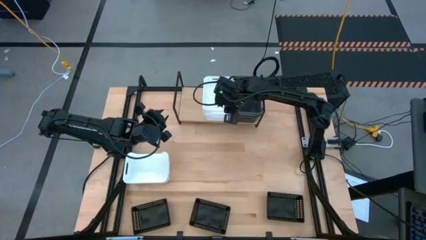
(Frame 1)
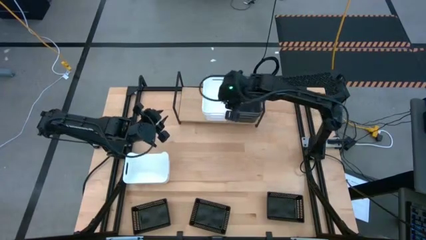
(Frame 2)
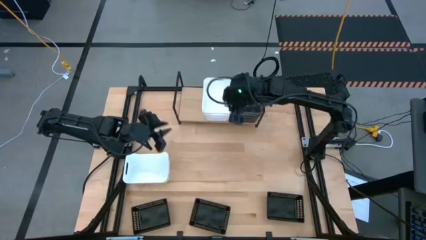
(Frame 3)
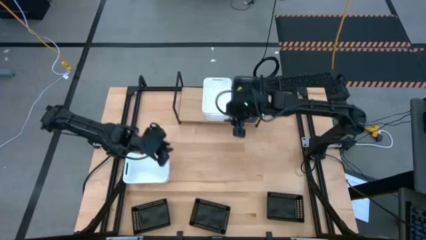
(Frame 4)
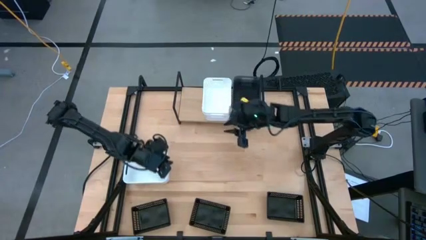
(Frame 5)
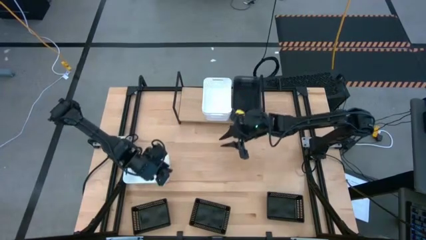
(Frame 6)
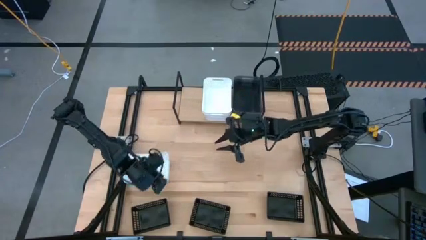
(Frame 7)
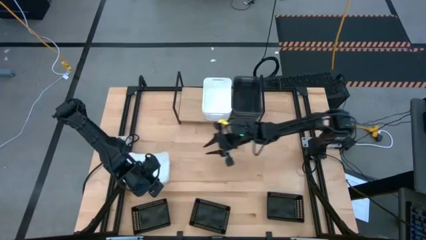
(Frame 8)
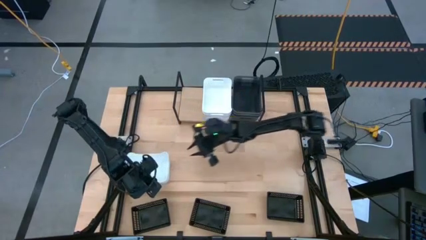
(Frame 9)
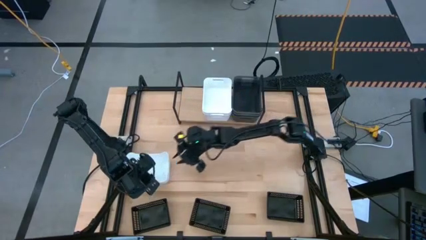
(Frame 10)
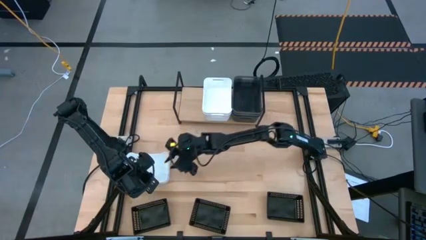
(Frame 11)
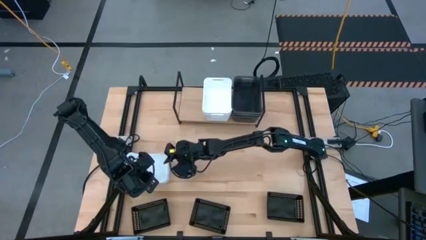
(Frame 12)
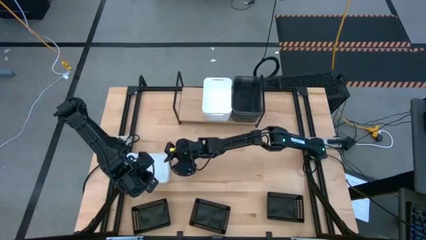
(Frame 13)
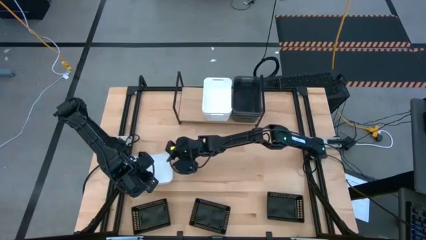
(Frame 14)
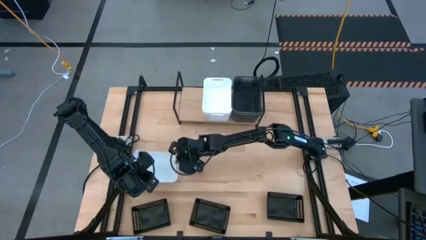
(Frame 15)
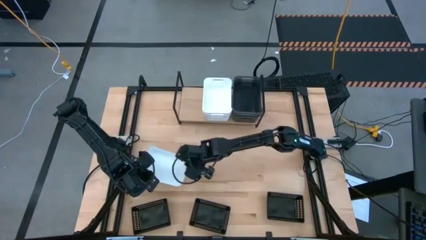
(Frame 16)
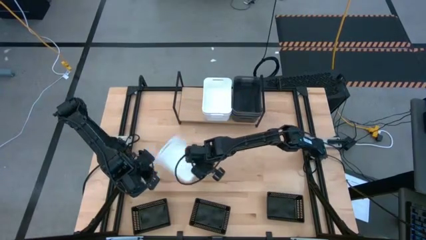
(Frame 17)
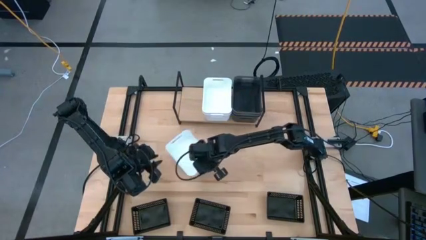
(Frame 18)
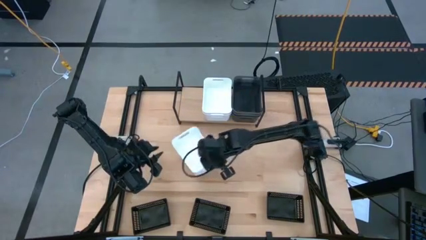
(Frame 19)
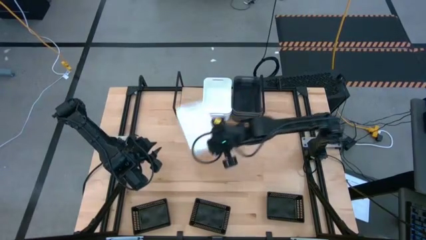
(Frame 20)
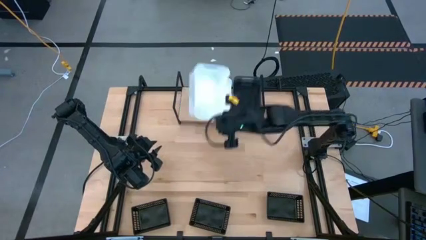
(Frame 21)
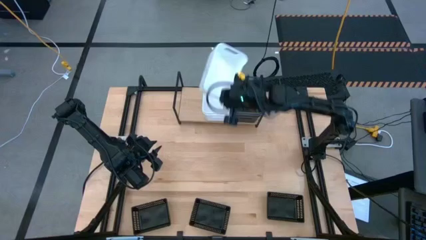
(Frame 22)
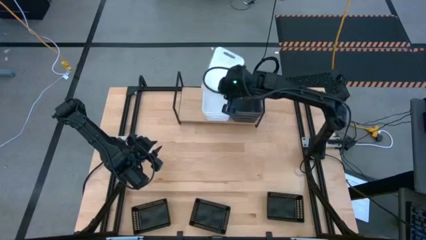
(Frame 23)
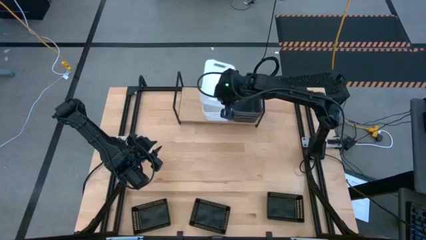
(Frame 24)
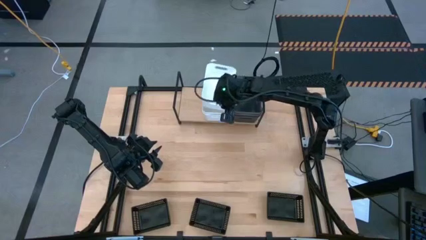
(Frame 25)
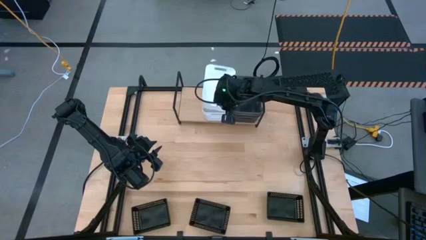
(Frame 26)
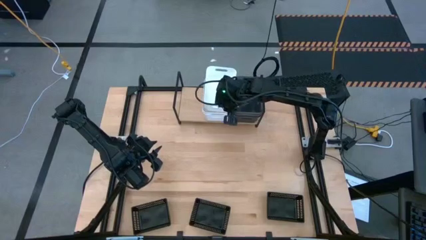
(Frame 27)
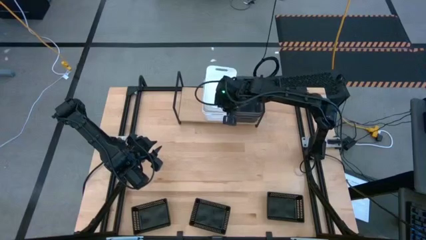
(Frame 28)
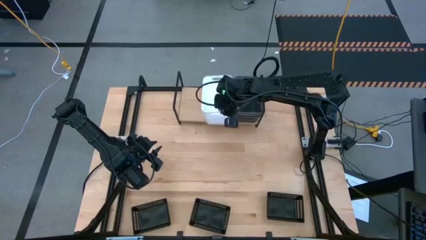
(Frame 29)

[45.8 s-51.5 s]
Task: Stack baskets on shelf by color
Stack the white bin into the white bin on the shelf

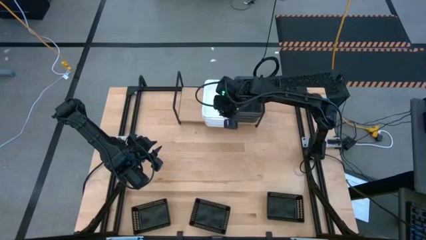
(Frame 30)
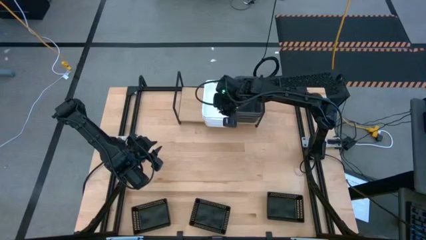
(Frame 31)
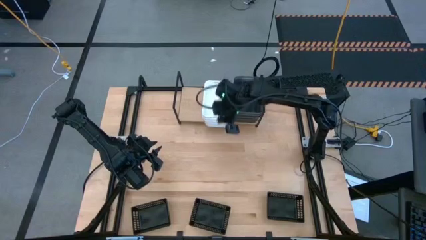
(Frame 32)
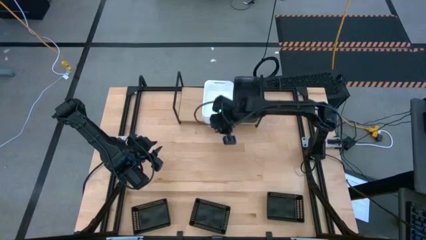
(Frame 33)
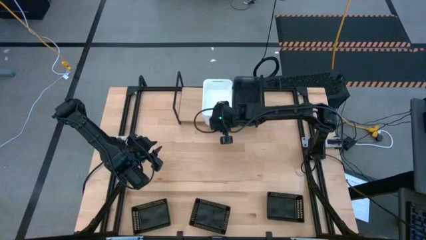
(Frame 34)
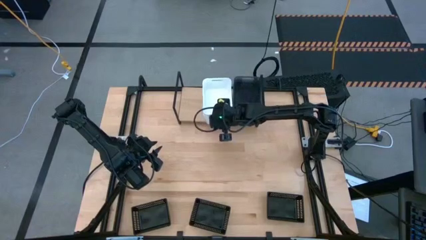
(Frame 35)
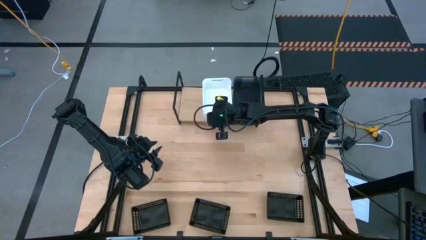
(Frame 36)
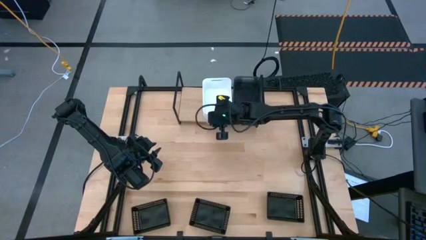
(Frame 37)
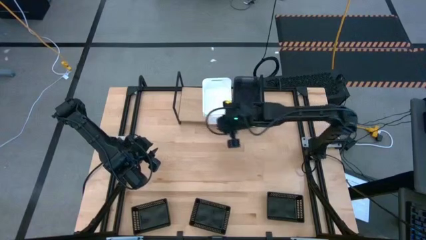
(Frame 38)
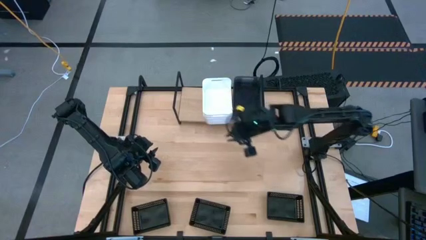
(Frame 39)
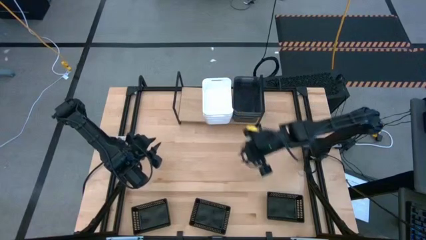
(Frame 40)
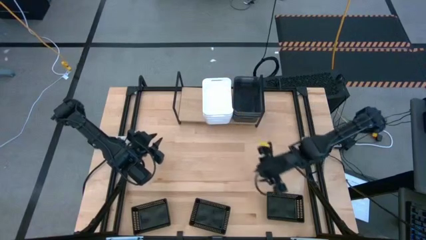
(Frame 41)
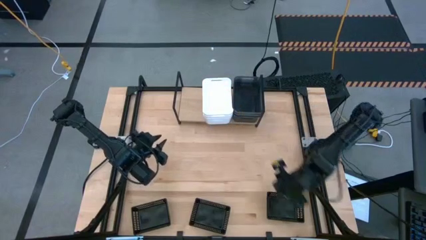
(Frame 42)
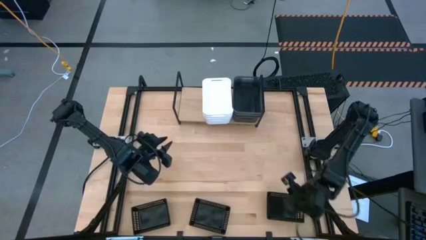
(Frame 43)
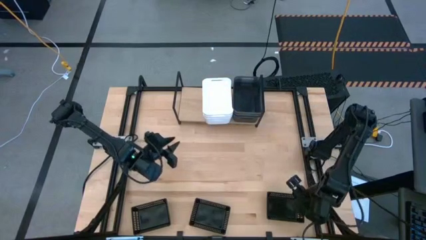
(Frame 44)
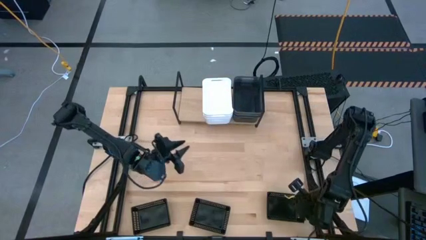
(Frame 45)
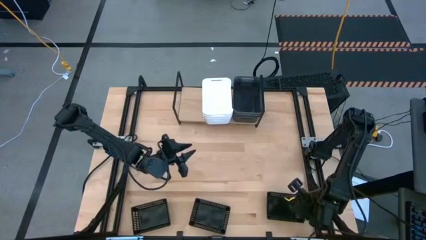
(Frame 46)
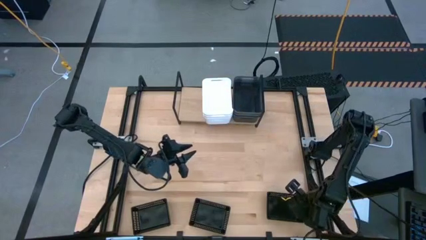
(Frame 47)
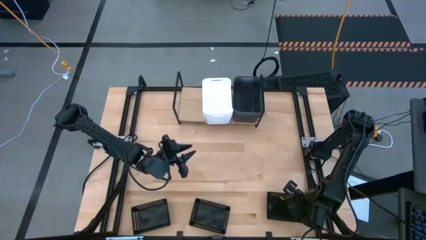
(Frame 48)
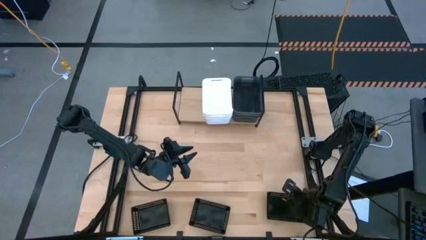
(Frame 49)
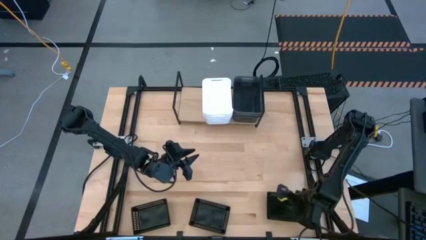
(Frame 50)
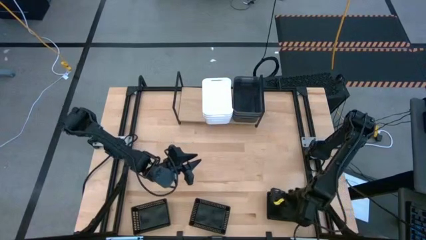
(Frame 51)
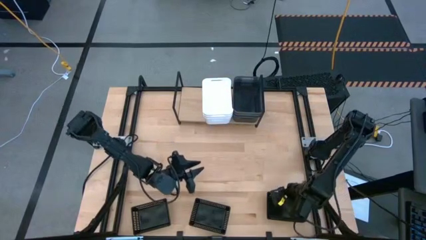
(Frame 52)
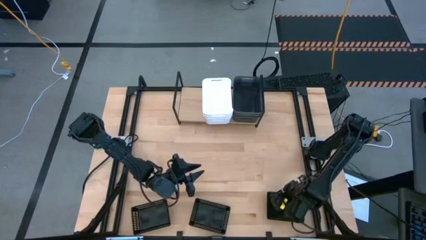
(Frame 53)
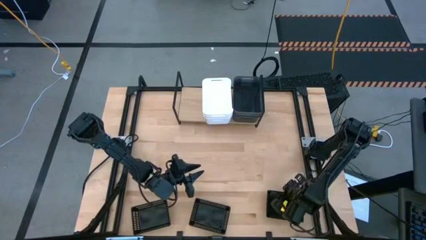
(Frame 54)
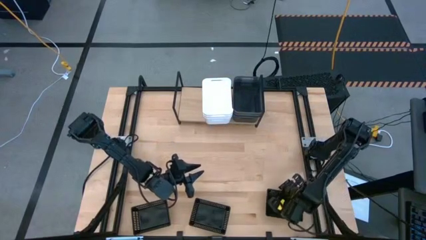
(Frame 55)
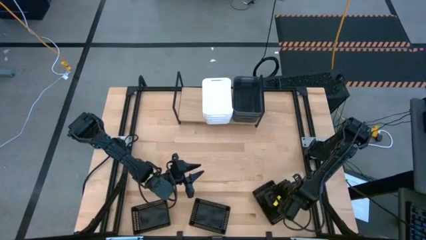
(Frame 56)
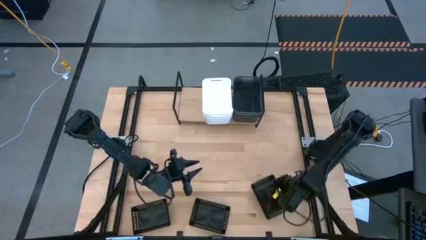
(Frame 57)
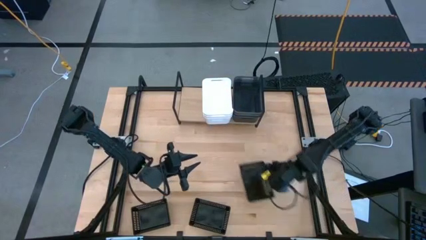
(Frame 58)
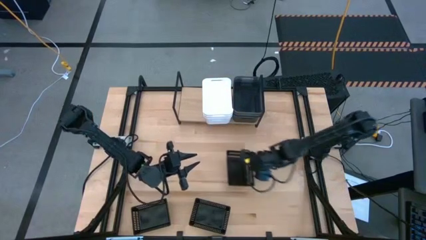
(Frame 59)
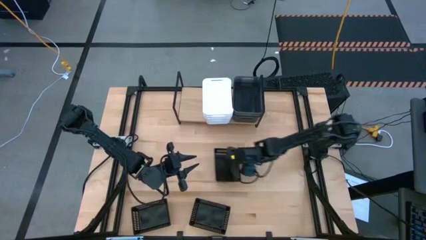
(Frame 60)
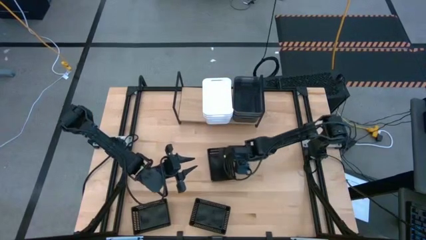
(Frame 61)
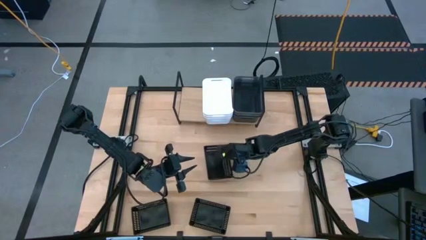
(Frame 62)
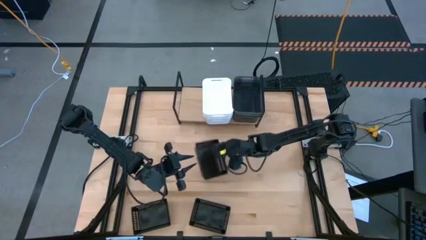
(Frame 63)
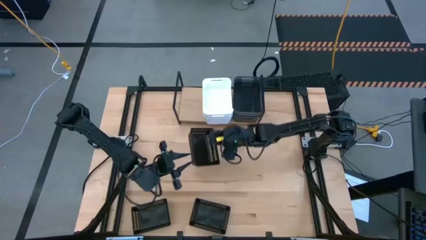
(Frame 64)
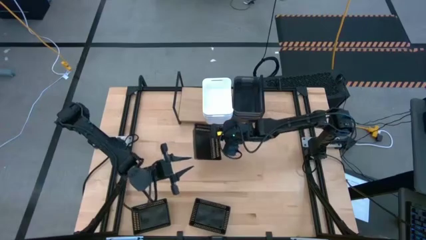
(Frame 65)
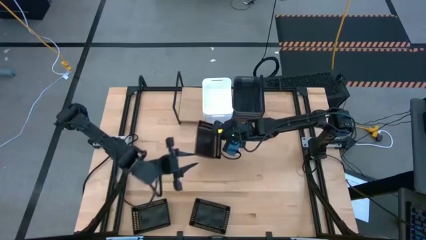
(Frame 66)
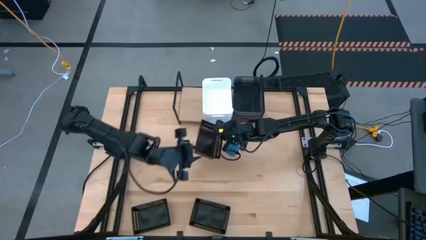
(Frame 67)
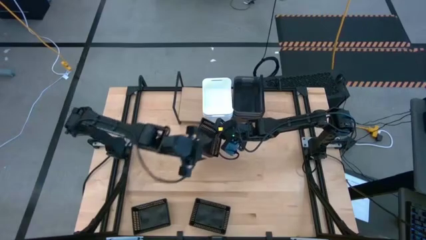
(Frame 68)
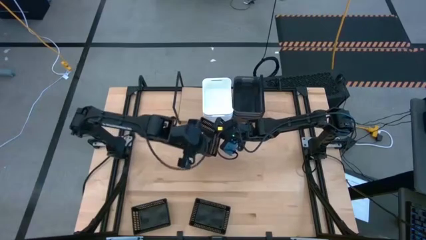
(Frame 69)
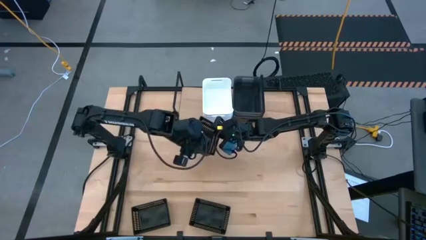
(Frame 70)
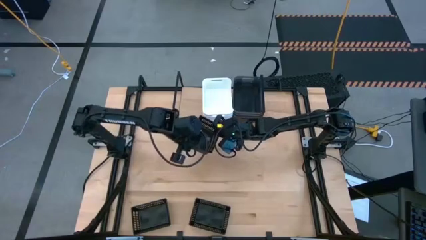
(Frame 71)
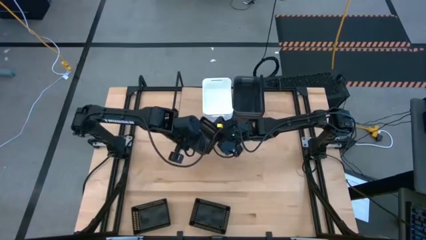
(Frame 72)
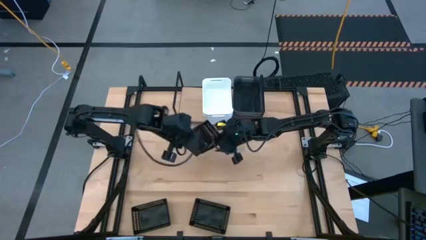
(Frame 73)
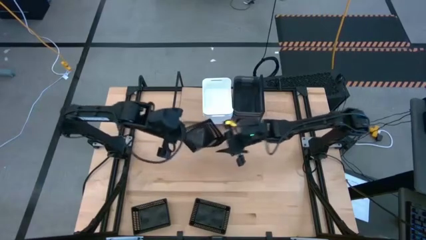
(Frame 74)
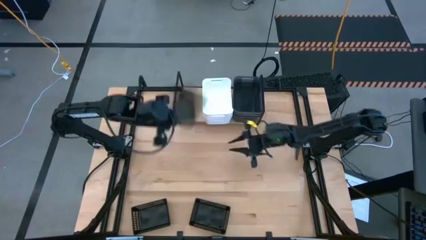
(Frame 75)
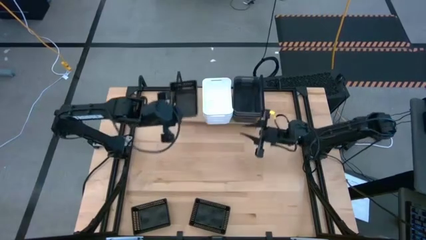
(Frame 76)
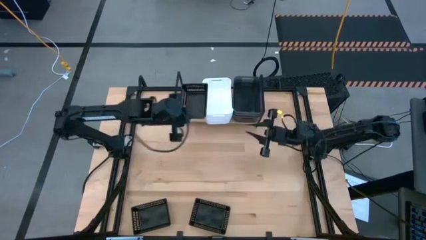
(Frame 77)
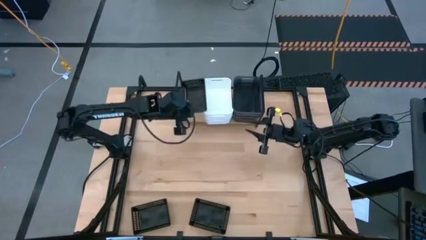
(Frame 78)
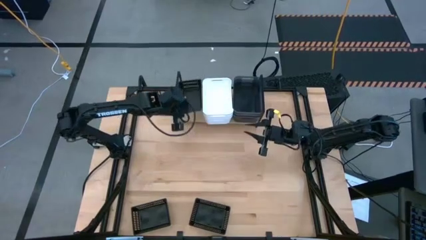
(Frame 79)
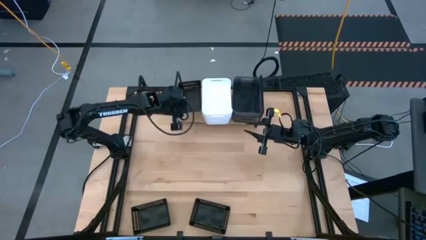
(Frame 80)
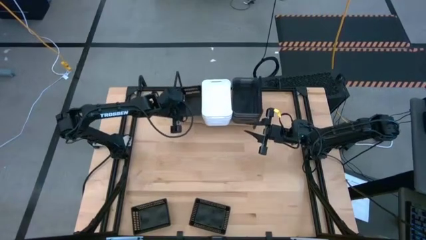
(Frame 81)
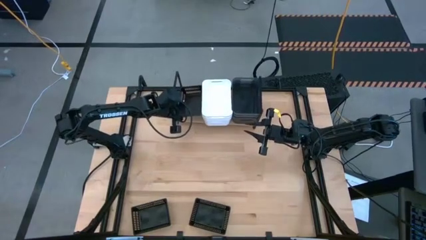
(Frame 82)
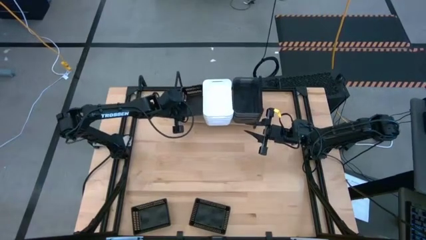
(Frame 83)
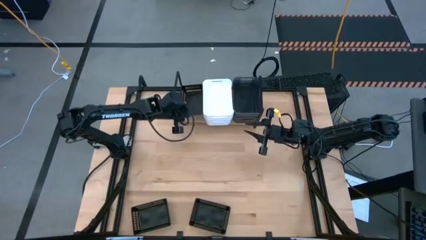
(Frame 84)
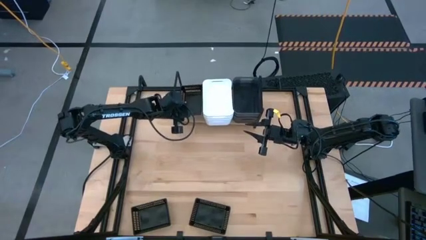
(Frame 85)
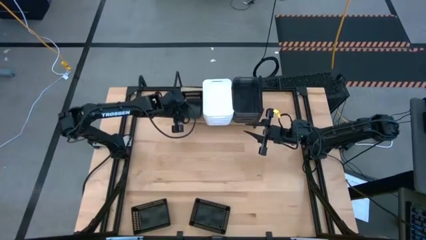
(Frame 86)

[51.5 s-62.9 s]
Put the right black bin on the shelf
